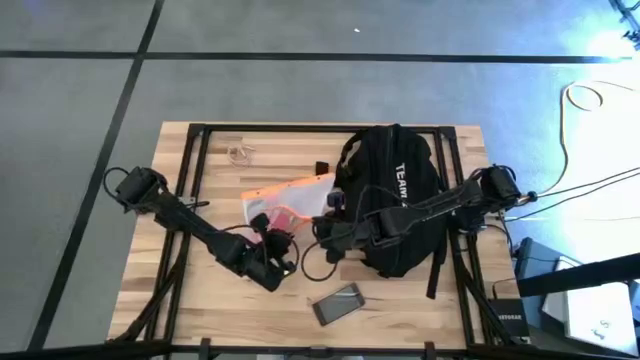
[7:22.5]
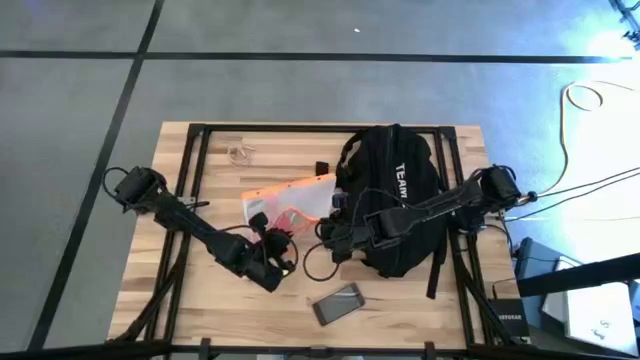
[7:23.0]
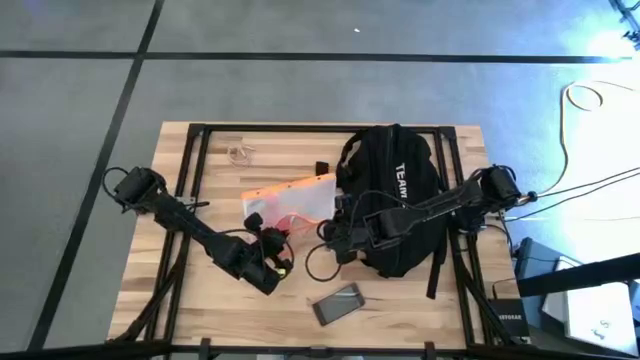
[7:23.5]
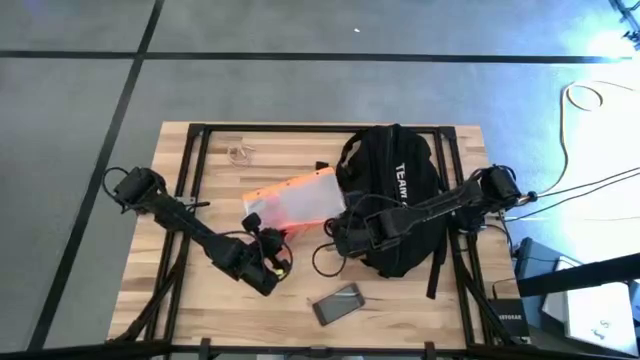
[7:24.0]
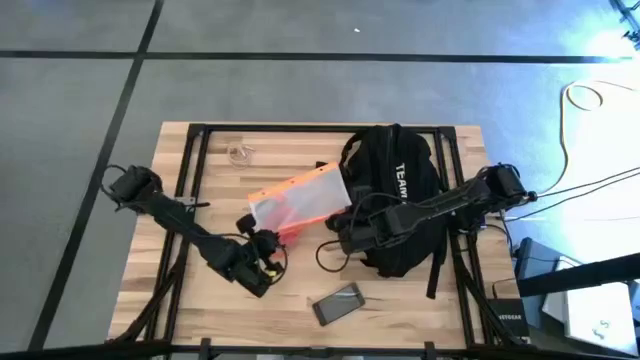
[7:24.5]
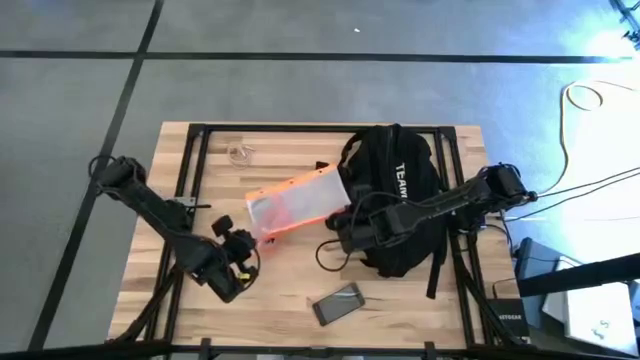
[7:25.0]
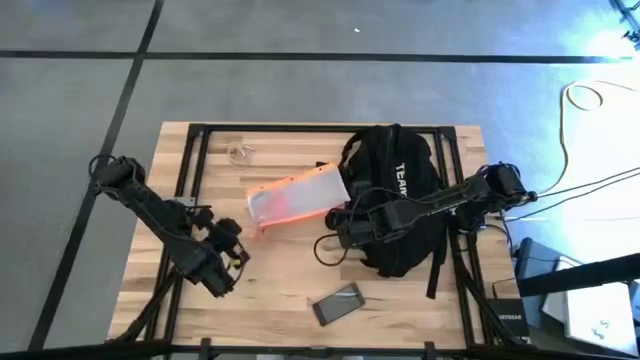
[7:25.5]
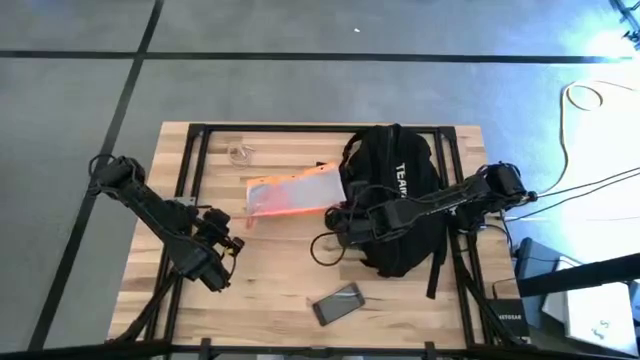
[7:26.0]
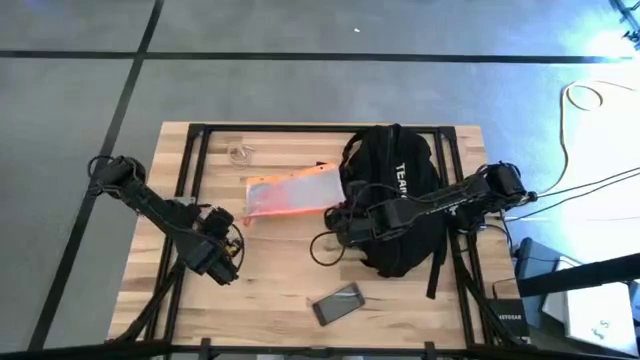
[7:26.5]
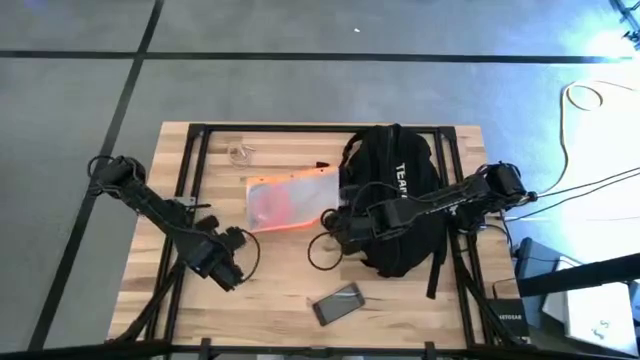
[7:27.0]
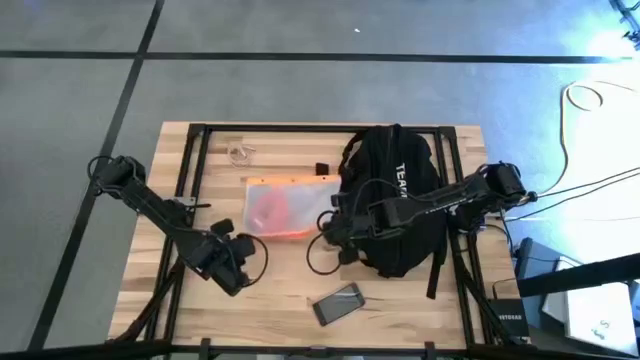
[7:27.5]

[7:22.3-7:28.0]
Task: Unpack backpack
Close the transparent white zip bag

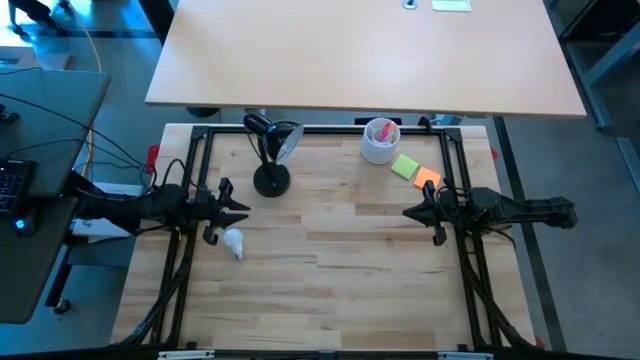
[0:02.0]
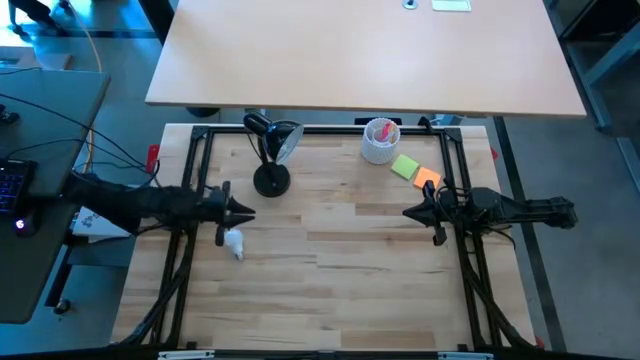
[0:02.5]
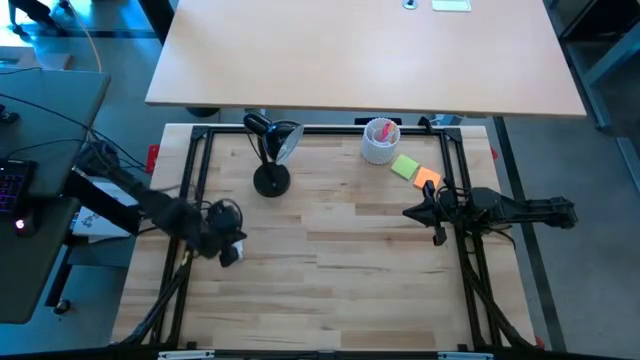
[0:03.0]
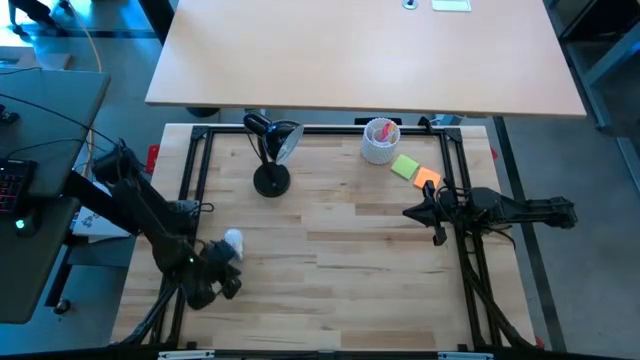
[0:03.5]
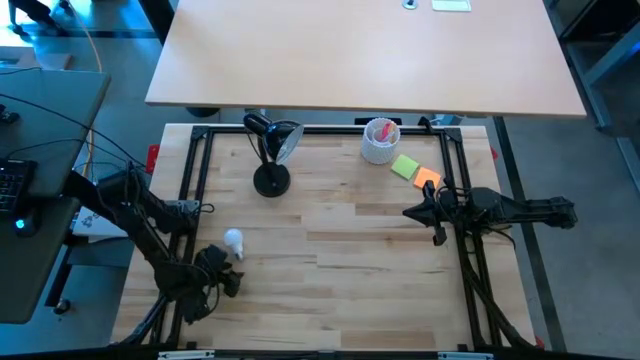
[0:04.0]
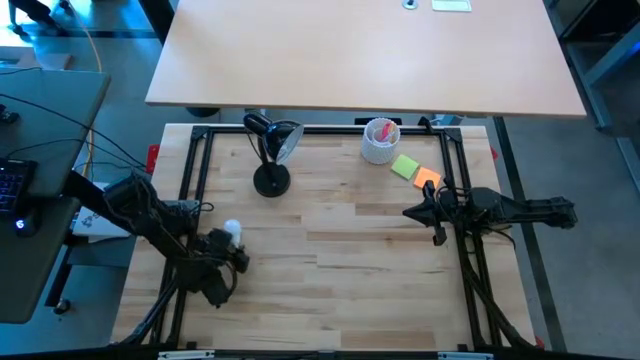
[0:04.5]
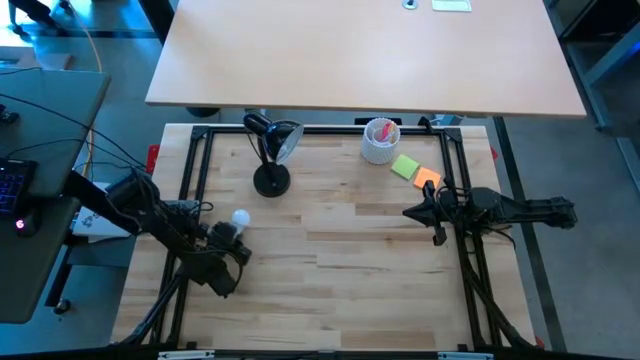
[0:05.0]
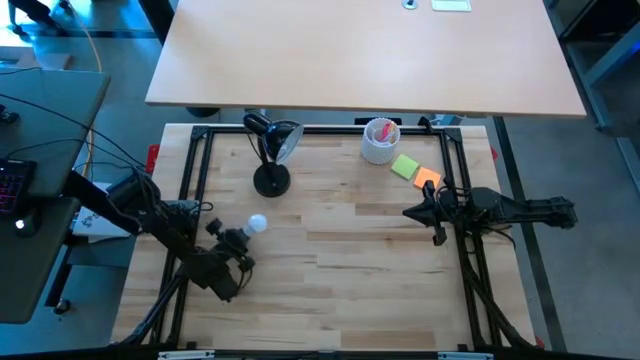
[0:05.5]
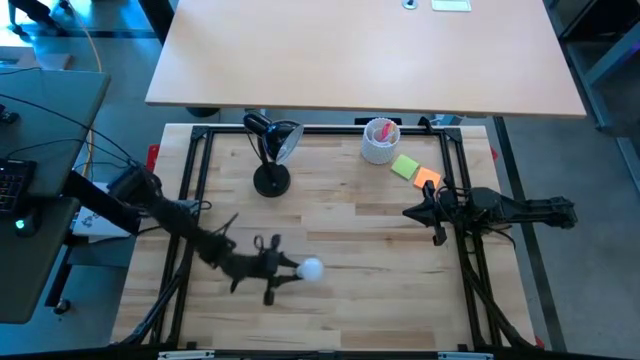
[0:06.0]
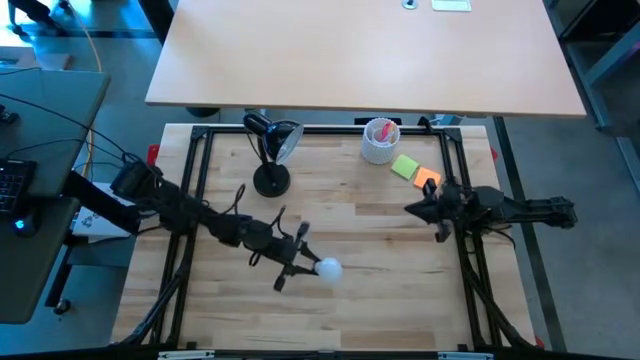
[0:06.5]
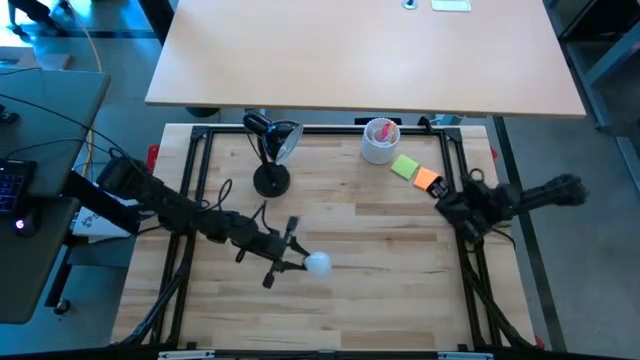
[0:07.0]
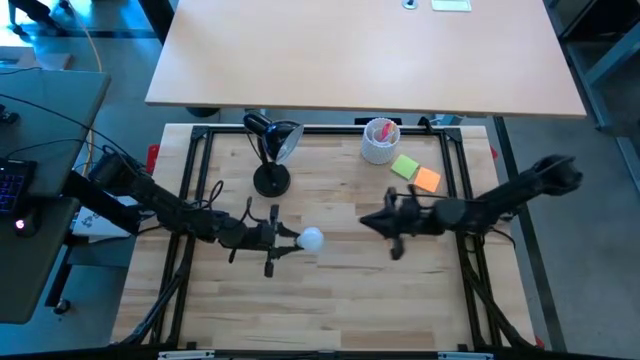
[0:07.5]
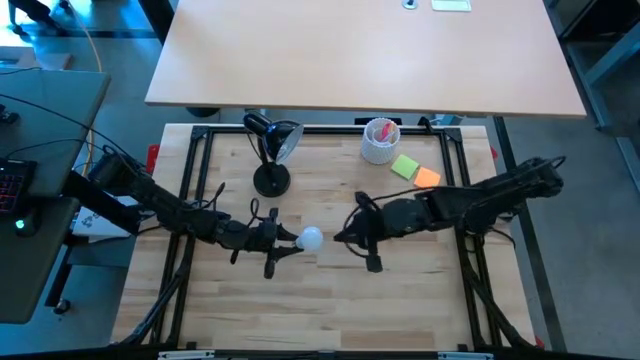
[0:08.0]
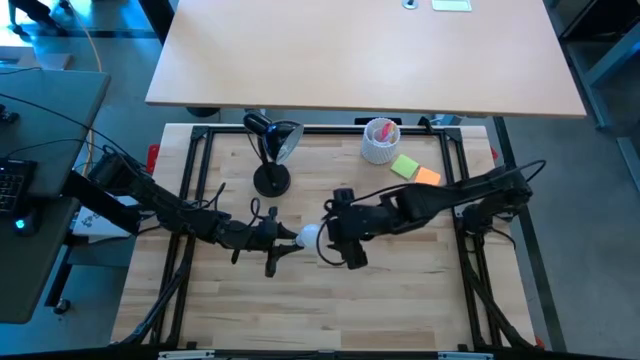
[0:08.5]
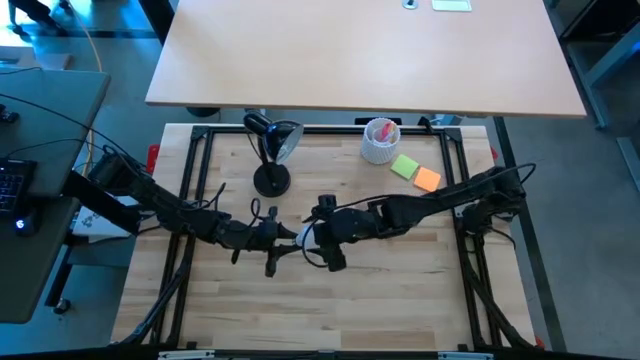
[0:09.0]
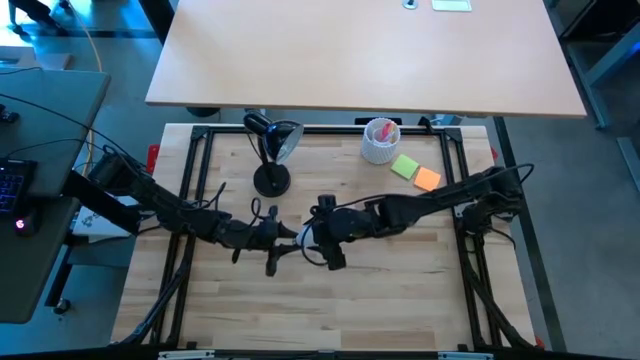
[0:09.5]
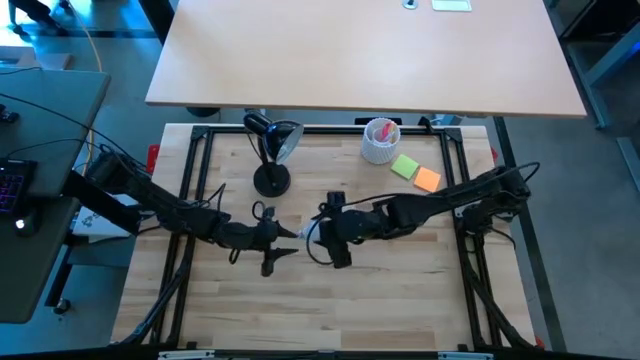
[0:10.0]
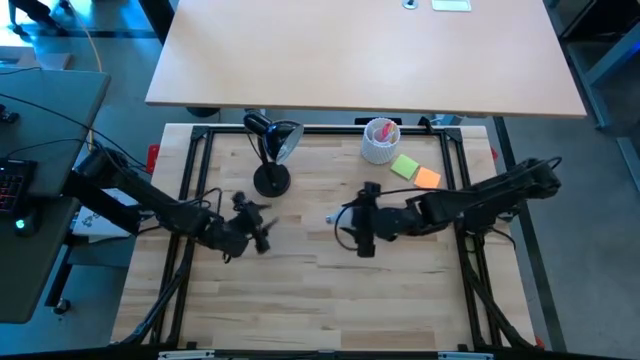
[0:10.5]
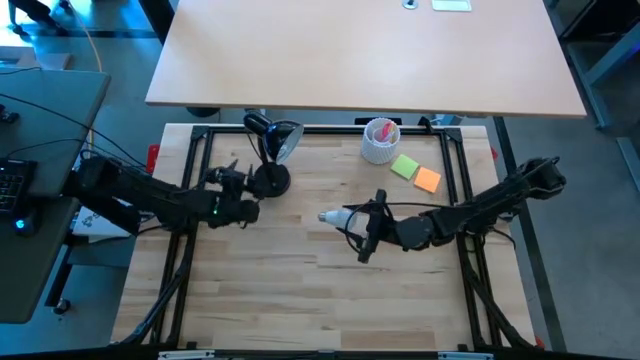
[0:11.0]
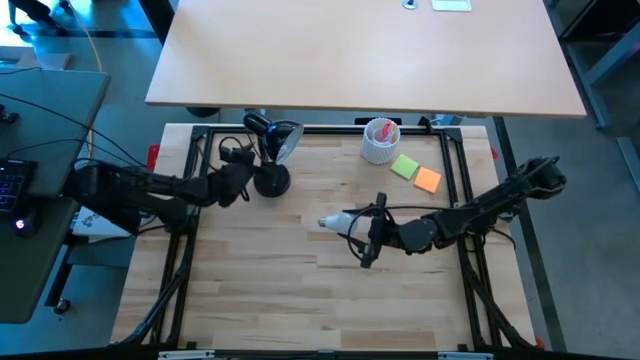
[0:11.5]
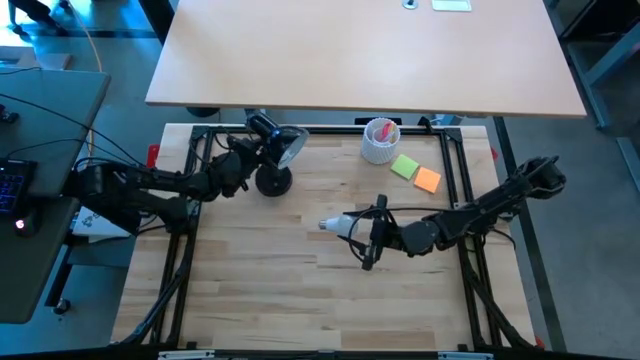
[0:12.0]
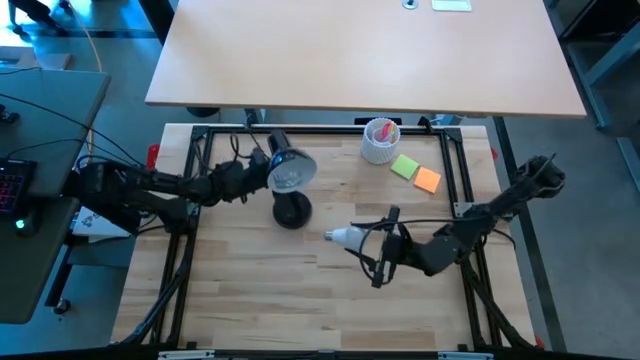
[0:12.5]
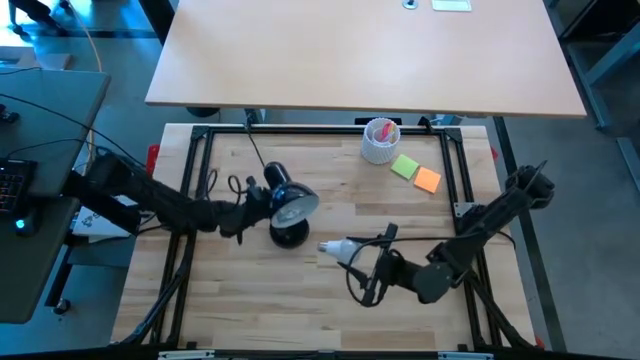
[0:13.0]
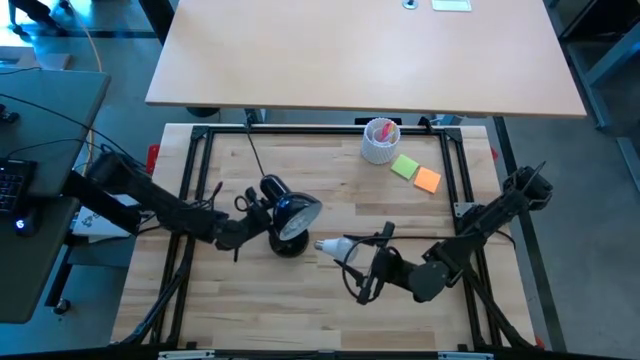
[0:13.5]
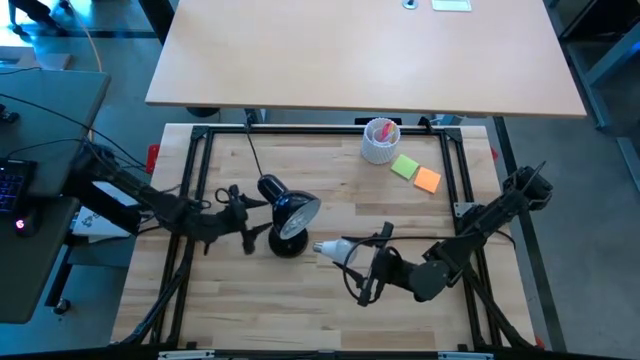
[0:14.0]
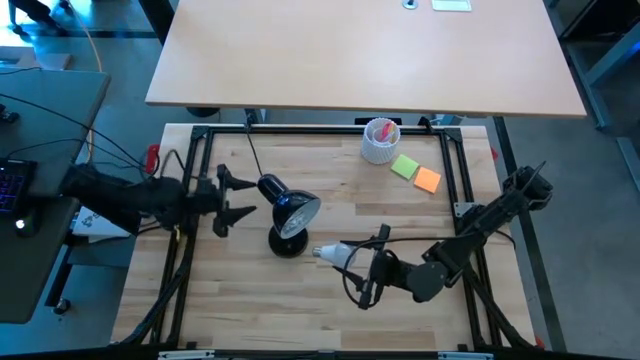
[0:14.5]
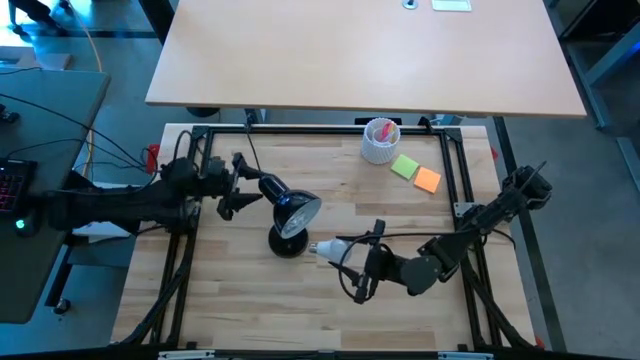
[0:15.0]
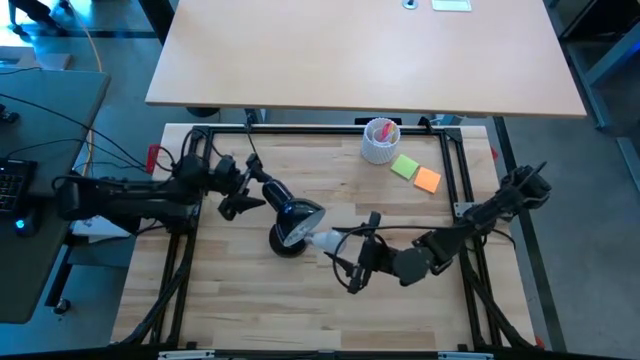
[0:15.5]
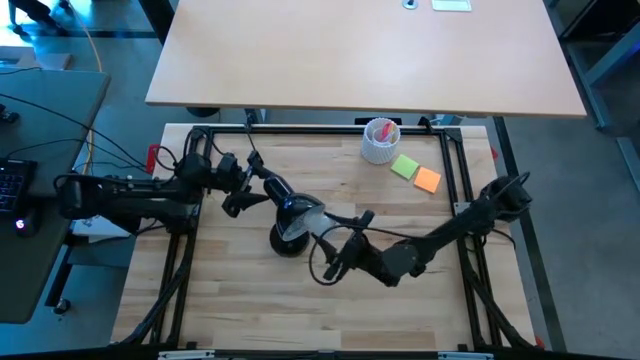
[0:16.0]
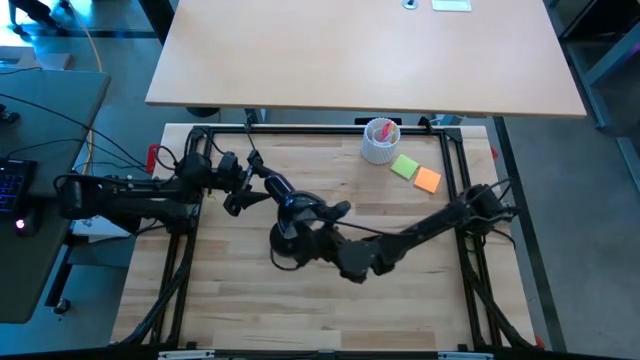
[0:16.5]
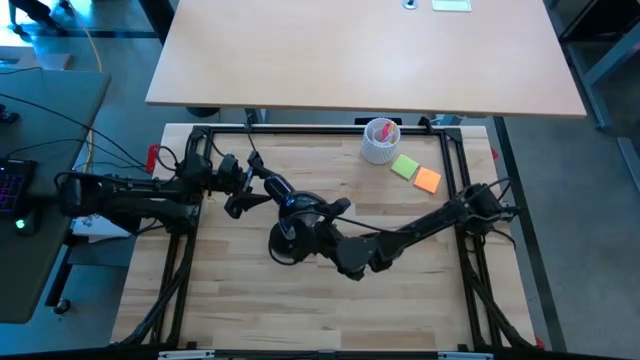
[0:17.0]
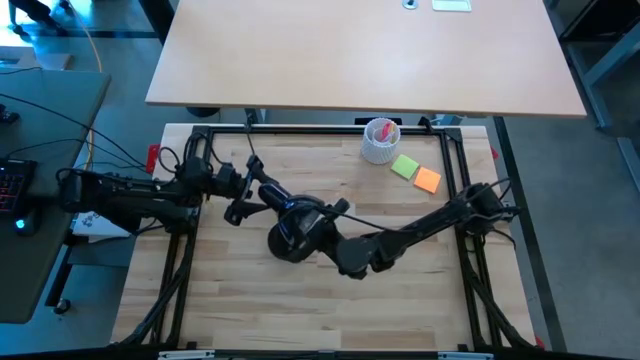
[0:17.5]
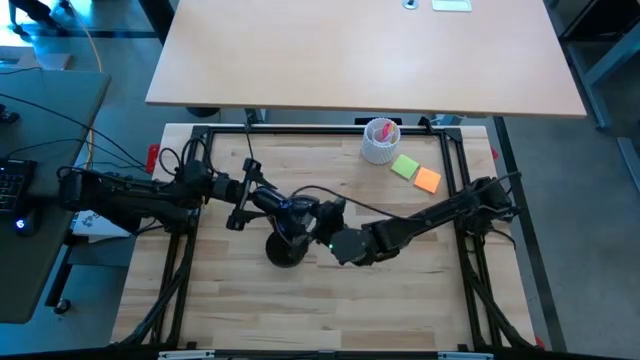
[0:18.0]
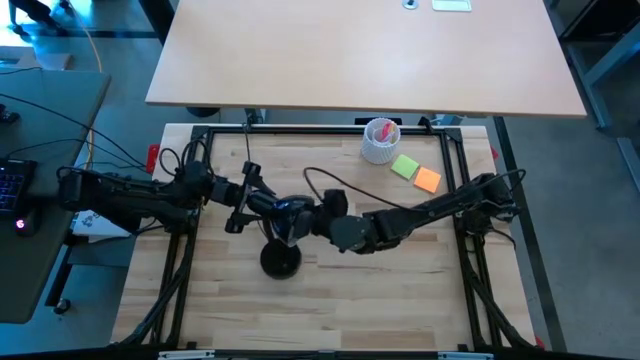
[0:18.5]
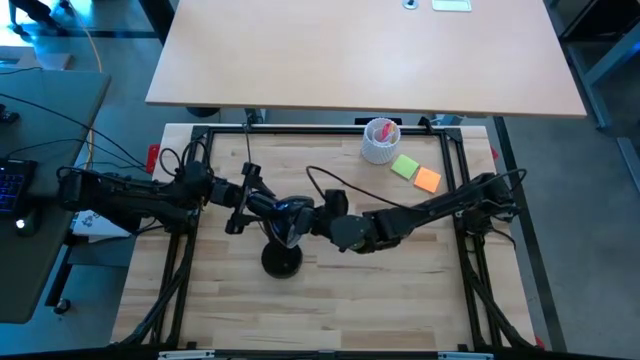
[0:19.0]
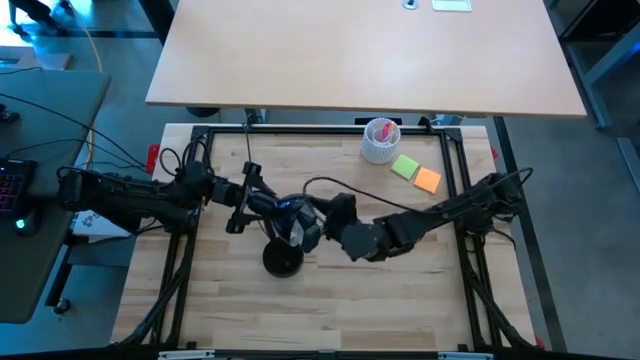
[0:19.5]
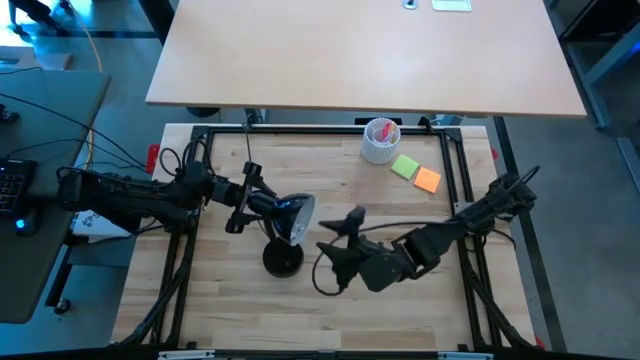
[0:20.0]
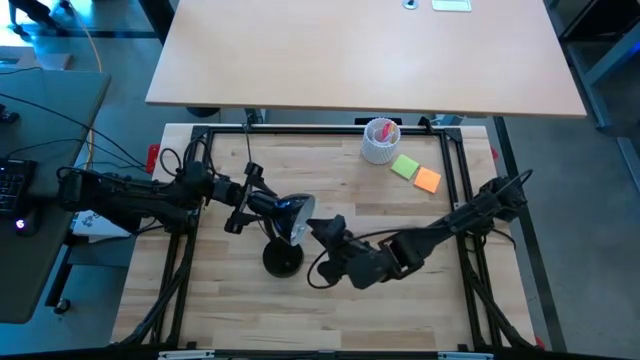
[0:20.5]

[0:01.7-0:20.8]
Task: Screw lightbulb
Insert the lightbulb into the lamp
